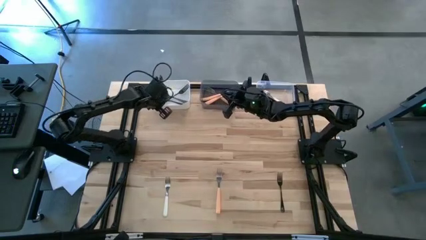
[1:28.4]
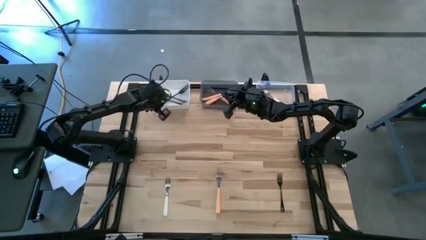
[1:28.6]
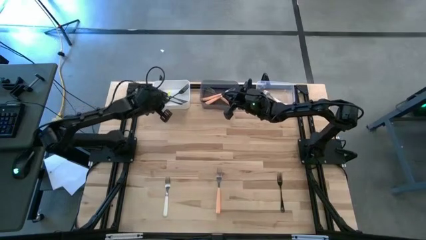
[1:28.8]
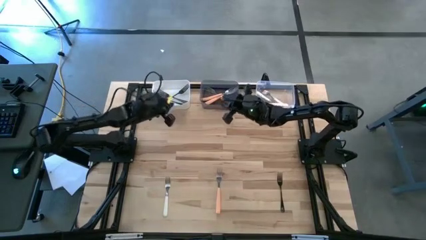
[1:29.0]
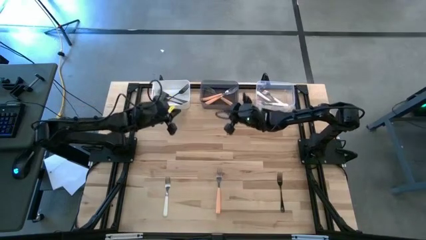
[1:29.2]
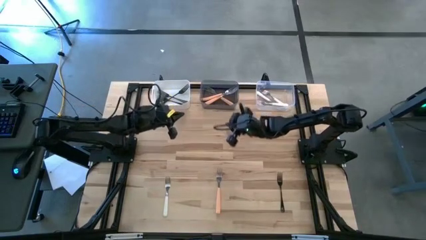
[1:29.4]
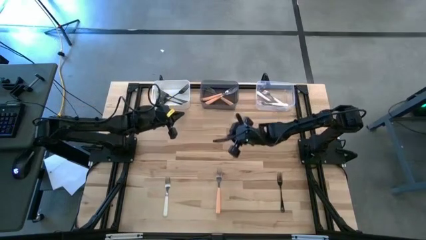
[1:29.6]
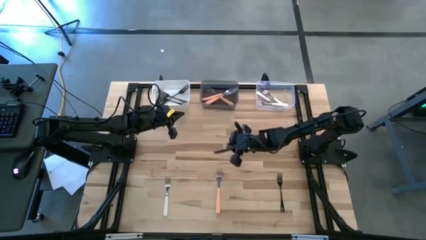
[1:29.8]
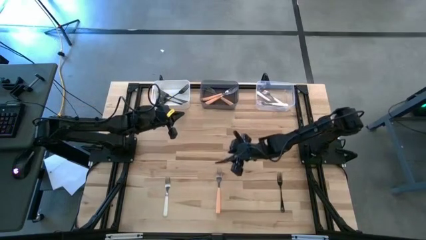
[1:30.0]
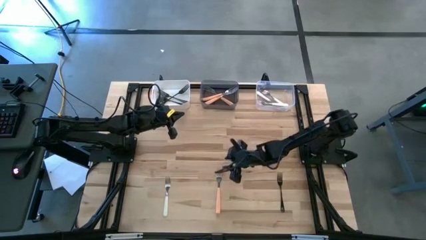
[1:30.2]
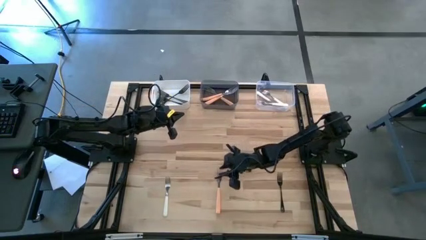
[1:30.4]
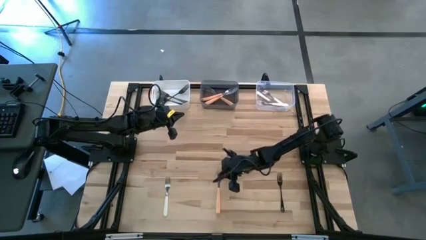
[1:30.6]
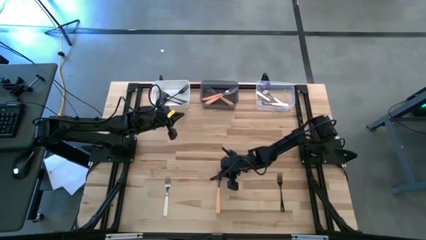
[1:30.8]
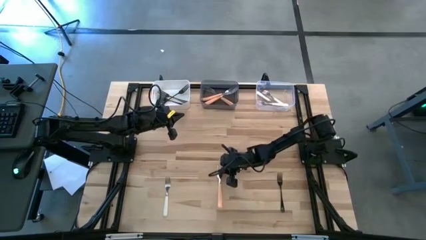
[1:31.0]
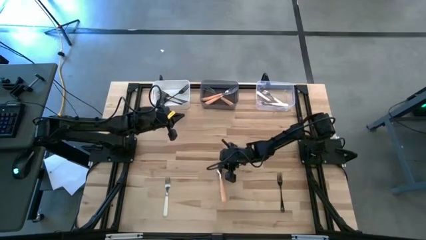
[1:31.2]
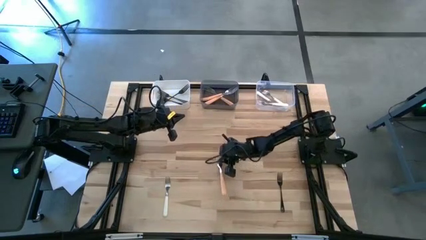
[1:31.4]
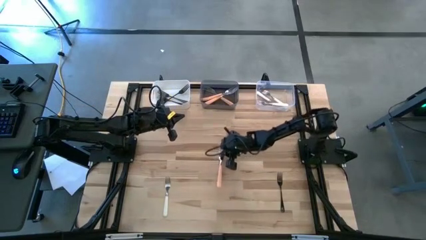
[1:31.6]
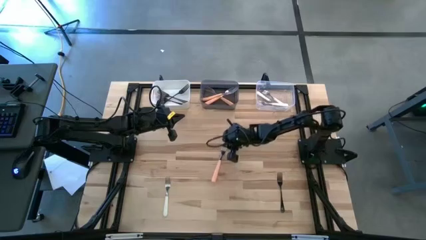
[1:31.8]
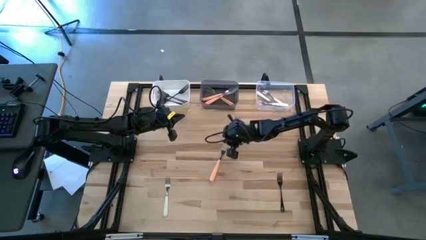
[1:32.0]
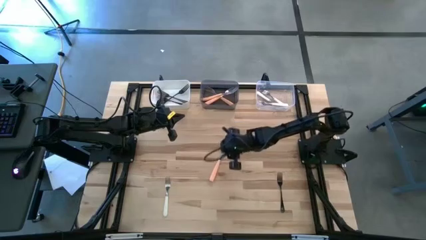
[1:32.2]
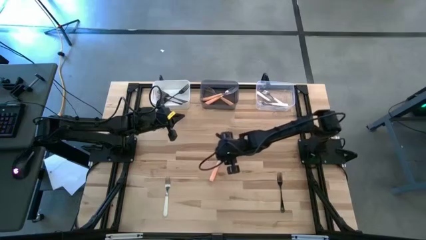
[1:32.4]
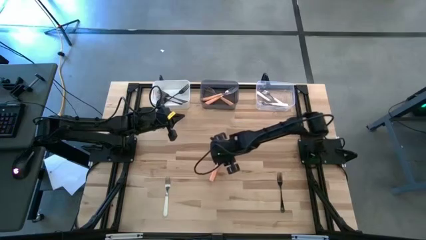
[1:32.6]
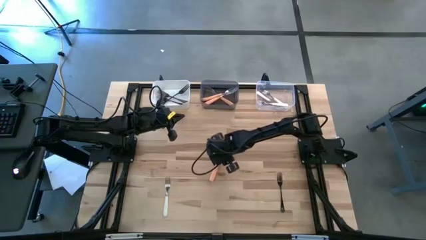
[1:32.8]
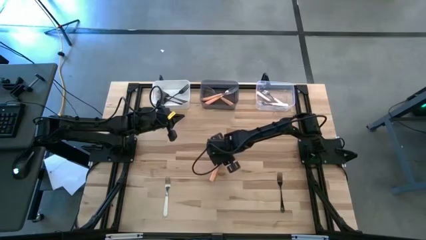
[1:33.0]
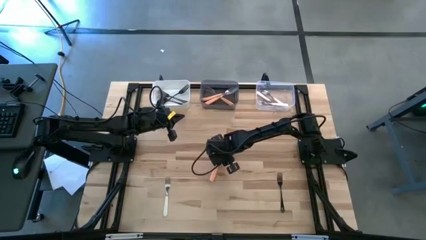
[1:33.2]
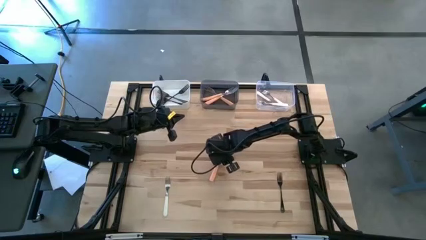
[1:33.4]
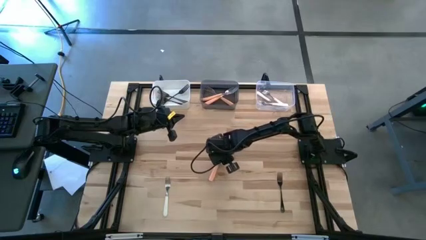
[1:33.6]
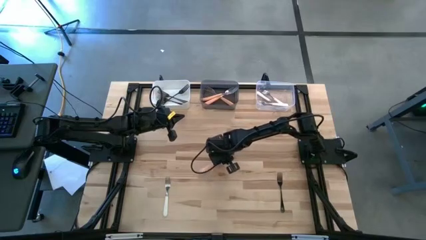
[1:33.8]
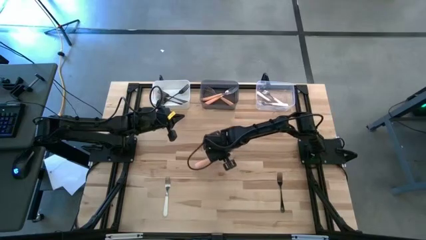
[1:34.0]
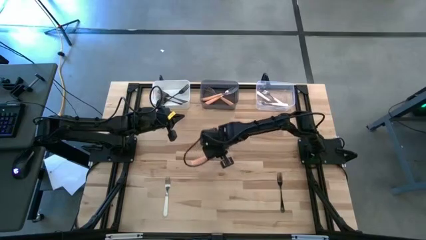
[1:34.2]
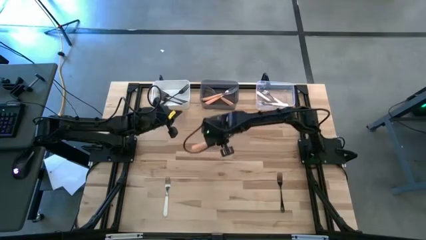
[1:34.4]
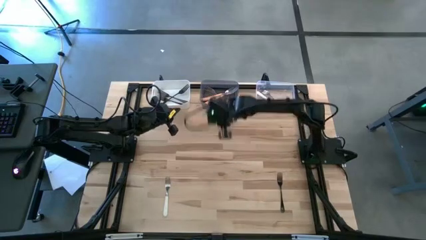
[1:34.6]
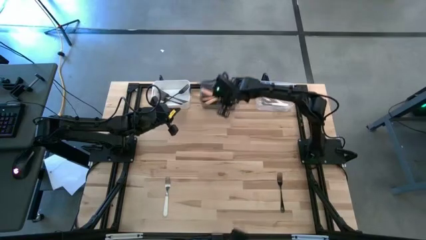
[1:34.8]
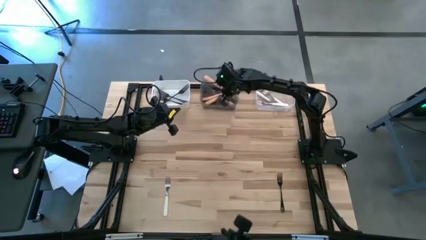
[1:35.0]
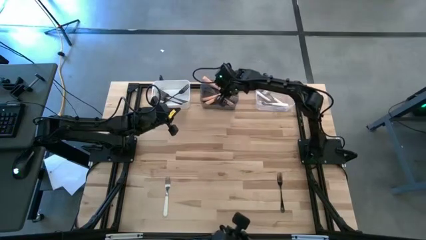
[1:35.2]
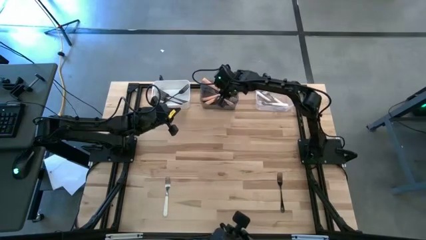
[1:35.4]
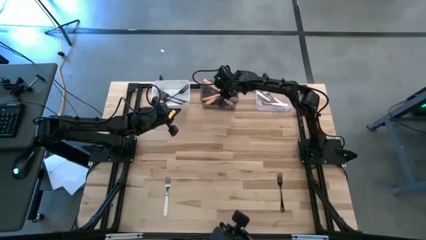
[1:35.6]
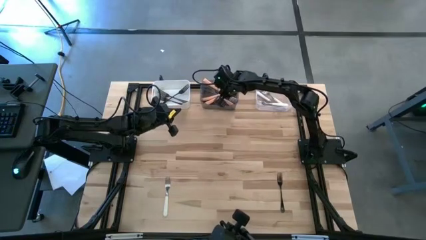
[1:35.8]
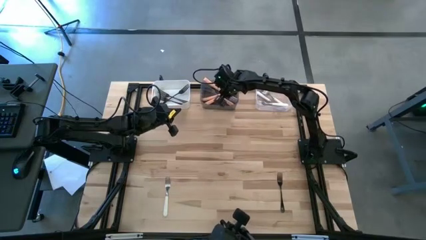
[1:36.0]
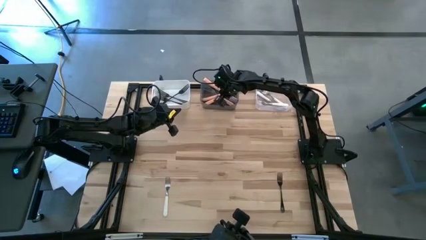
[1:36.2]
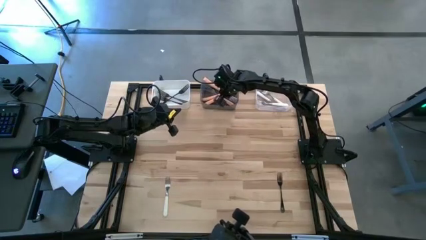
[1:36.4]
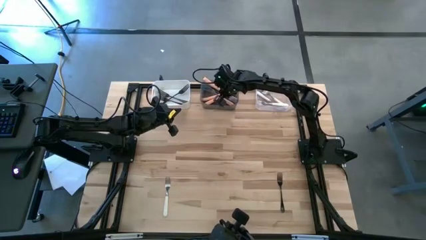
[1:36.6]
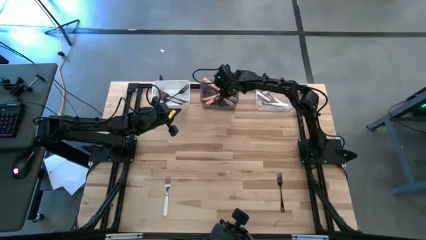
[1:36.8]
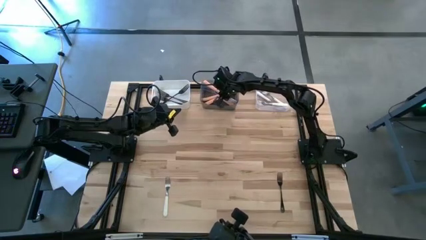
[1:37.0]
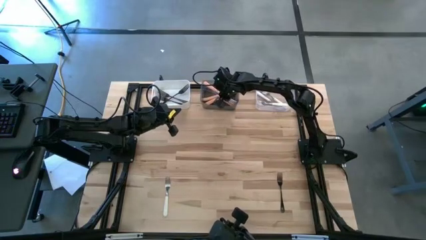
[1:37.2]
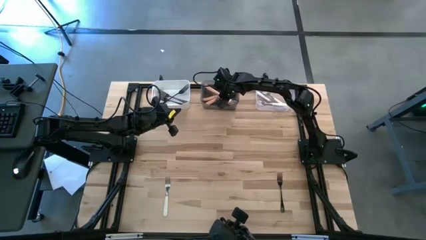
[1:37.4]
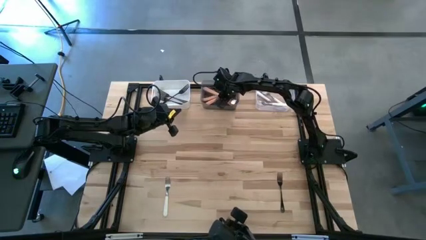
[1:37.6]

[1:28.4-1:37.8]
Task: Sort silverware by color (type)
Put the orange fork into the black bin

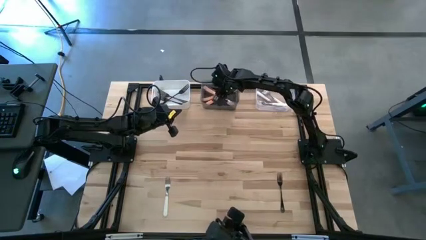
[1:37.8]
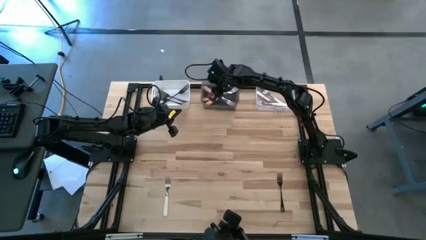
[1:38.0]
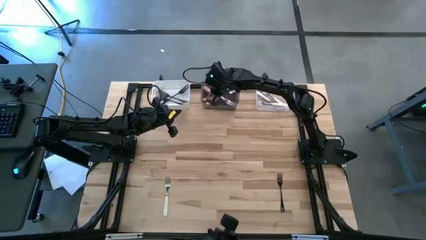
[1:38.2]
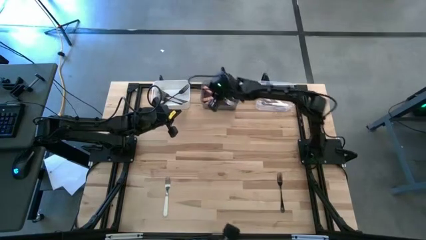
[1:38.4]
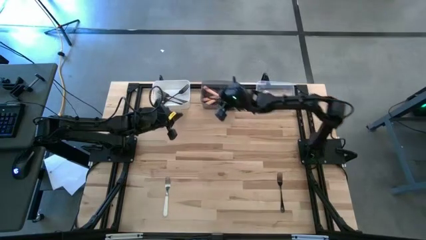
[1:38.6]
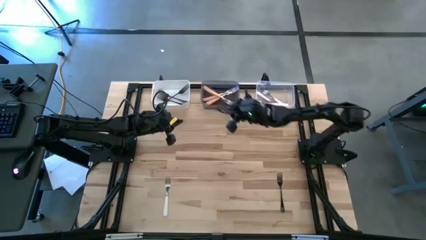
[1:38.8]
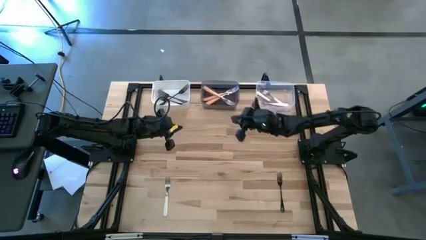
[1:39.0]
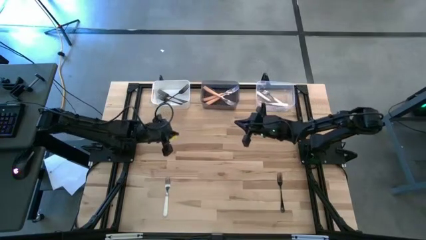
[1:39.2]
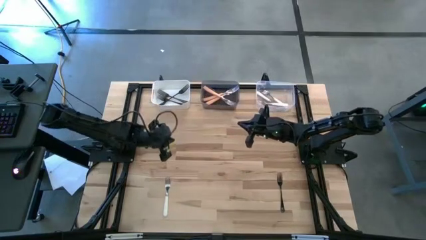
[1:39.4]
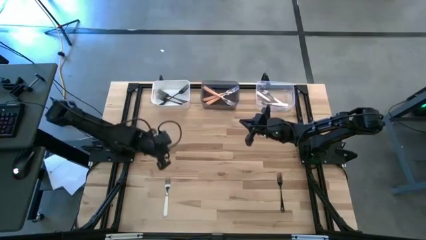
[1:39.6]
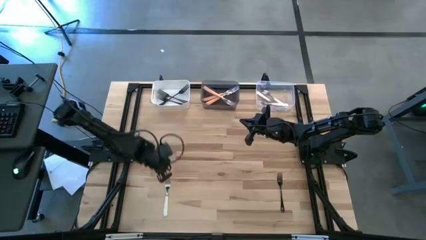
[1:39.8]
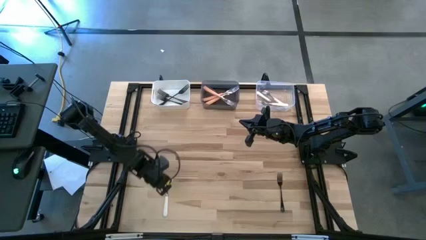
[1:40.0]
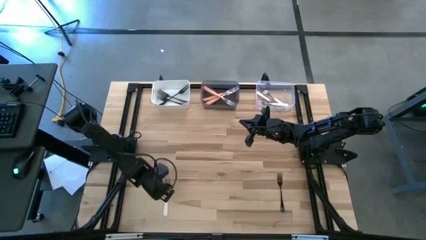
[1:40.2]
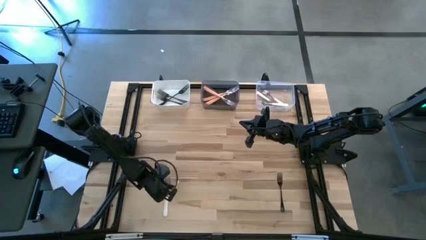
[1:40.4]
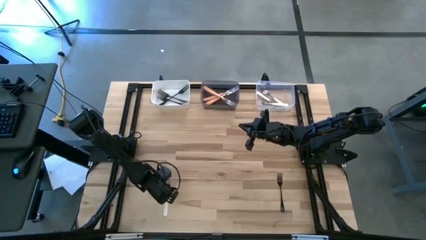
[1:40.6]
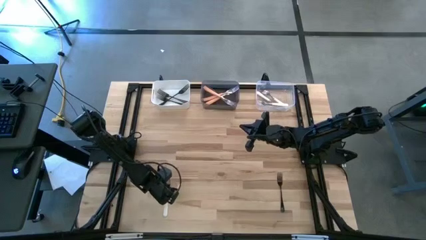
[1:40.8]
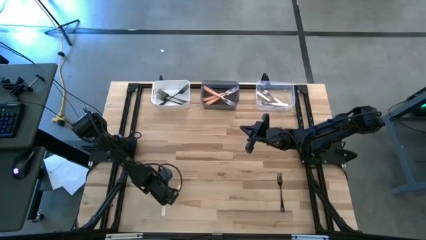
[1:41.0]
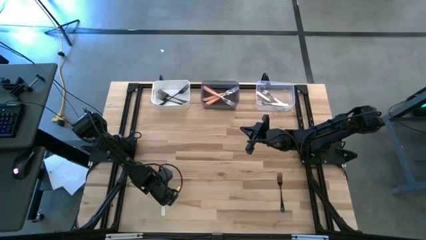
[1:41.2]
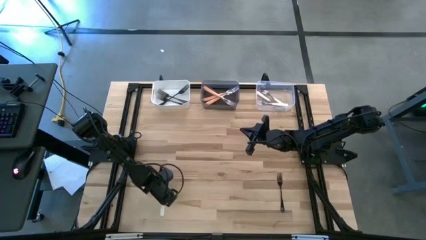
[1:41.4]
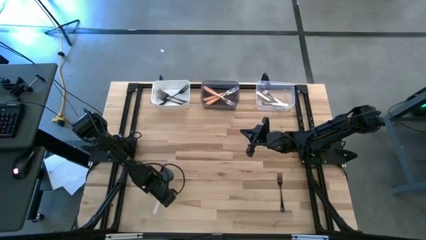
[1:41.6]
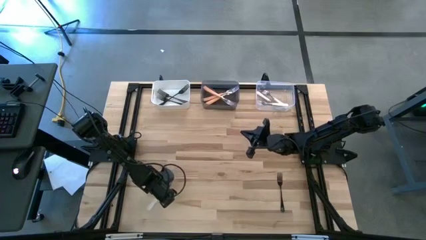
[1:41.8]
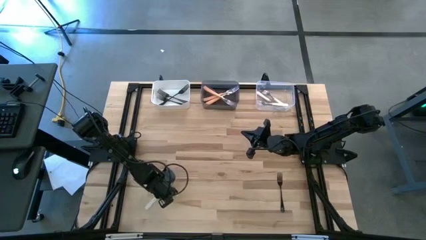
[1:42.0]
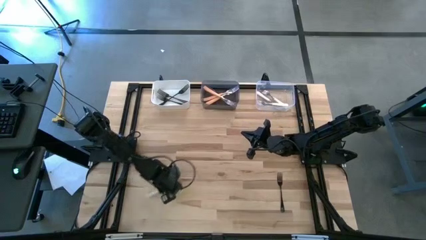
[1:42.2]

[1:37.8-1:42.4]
Put the white fork into the transparent bin

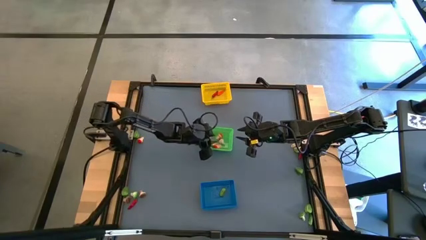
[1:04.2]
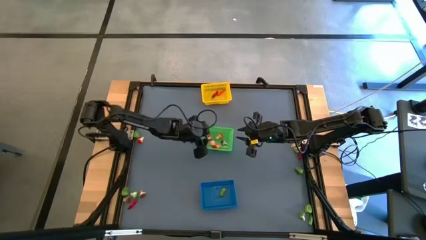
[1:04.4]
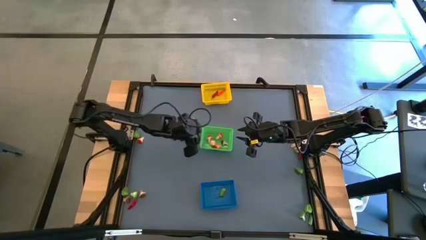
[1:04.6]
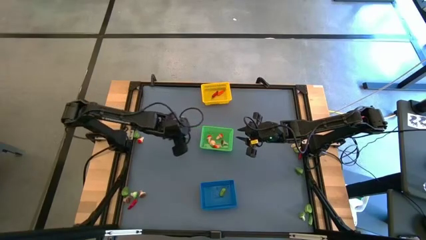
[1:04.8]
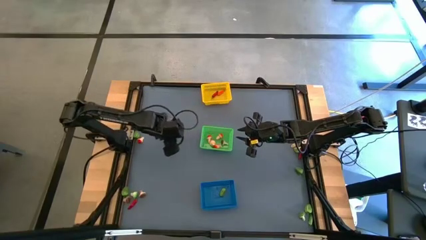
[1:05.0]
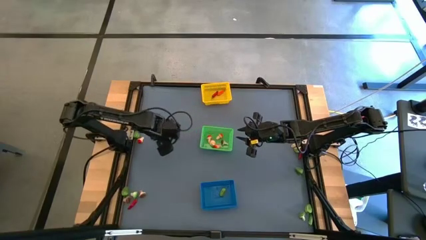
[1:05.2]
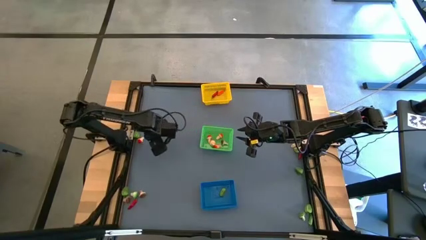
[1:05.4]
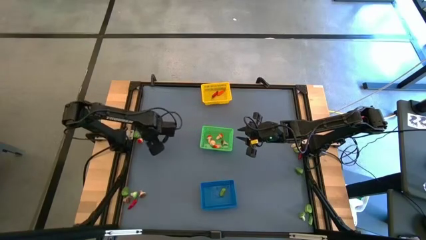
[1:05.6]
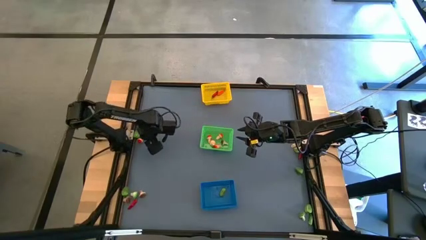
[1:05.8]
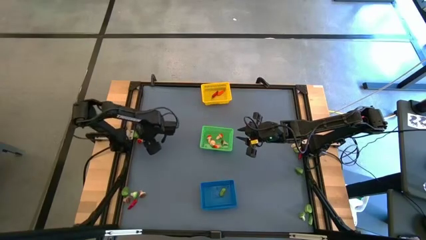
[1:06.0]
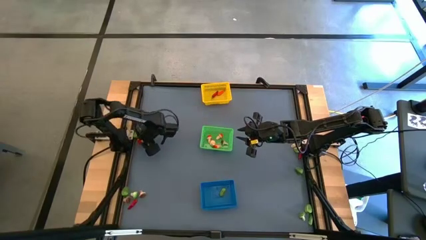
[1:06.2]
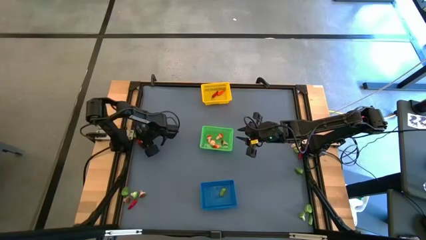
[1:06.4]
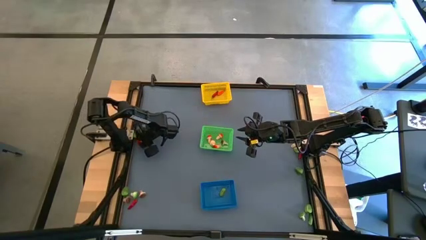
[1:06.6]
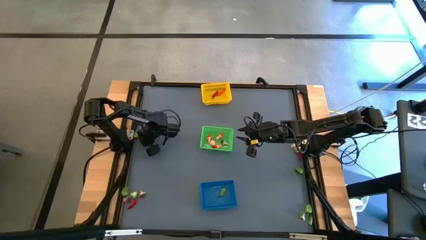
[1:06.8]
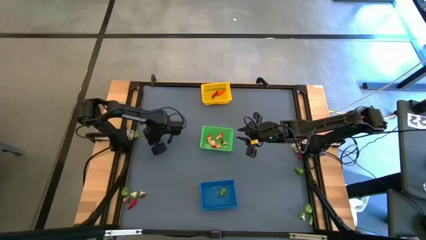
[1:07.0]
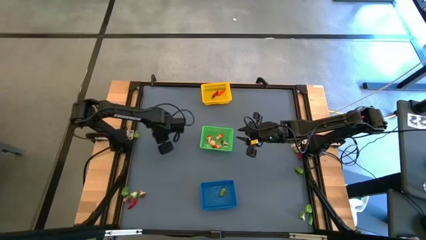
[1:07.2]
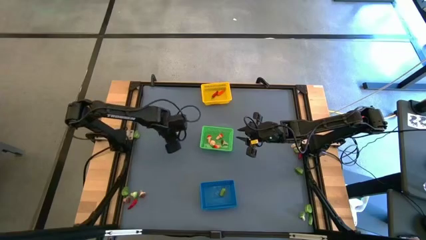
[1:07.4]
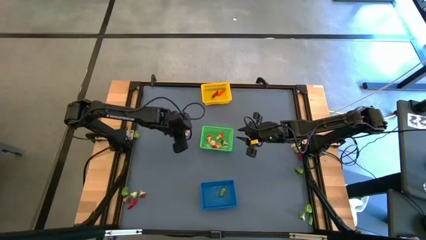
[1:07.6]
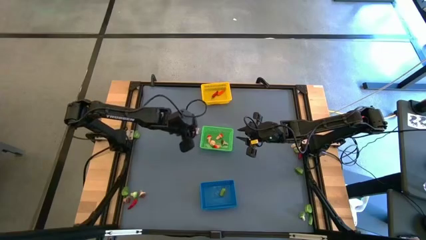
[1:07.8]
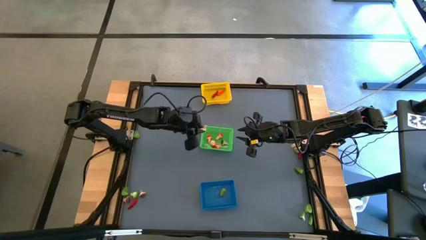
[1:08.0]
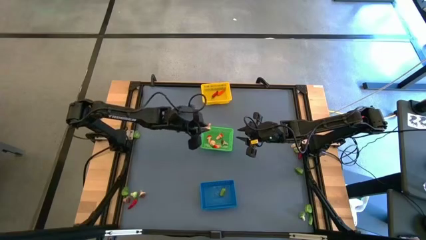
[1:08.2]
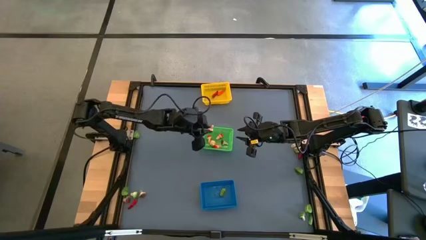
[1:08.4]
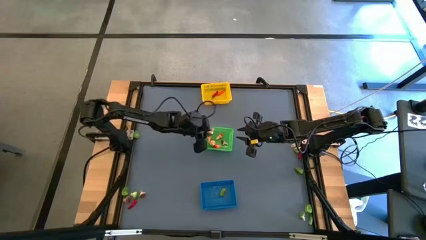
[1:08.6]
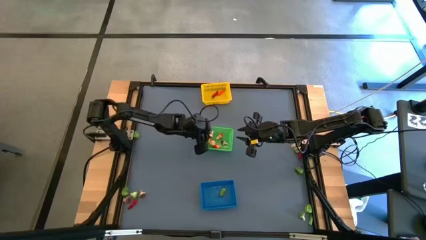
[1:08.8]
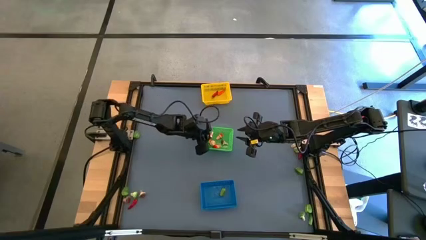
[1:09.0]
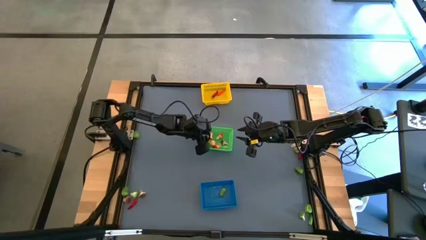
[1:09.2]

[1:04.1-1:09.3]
Task: Sort produce into baskets
Put the red mushroom into the green bin
